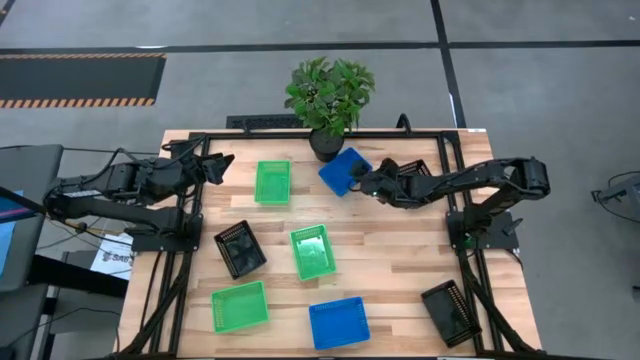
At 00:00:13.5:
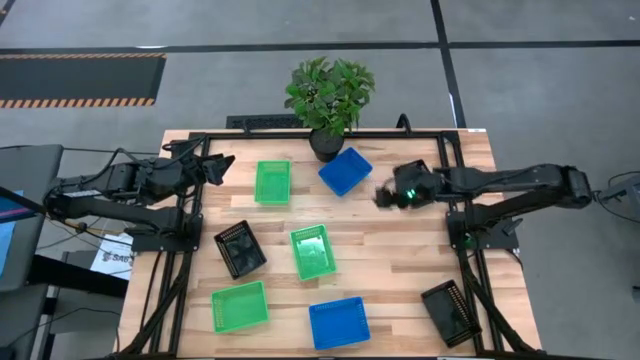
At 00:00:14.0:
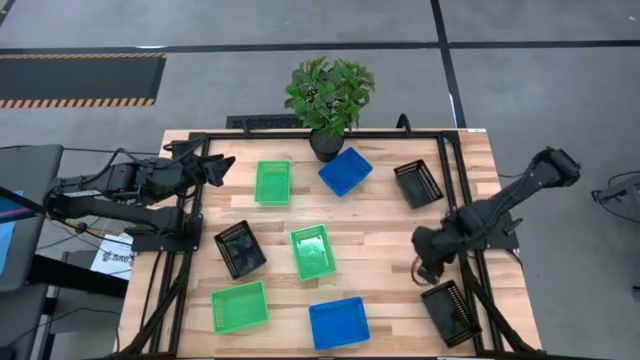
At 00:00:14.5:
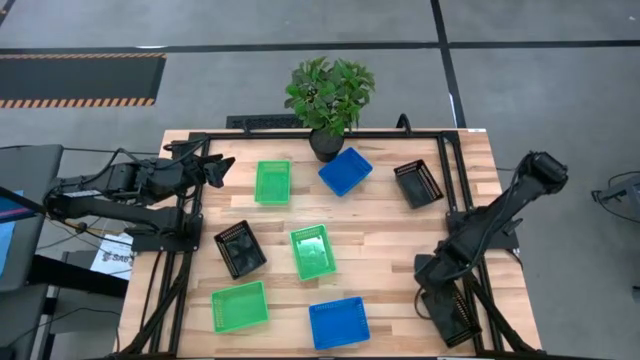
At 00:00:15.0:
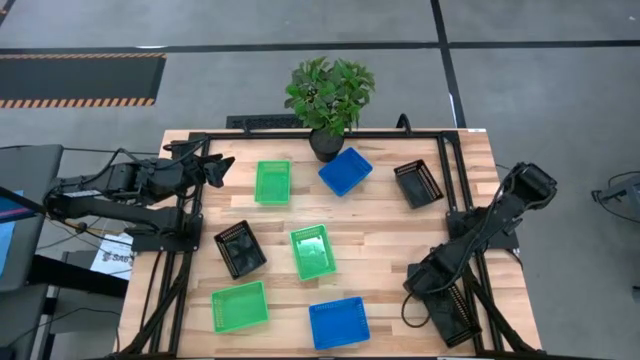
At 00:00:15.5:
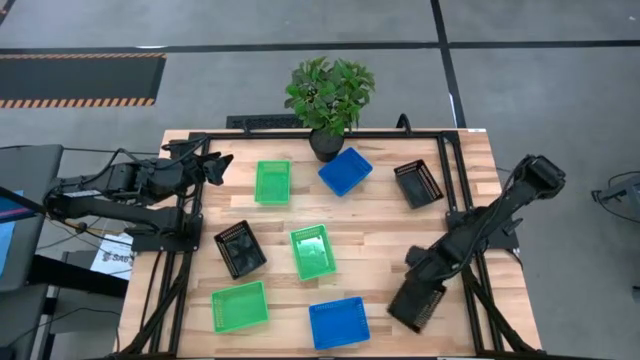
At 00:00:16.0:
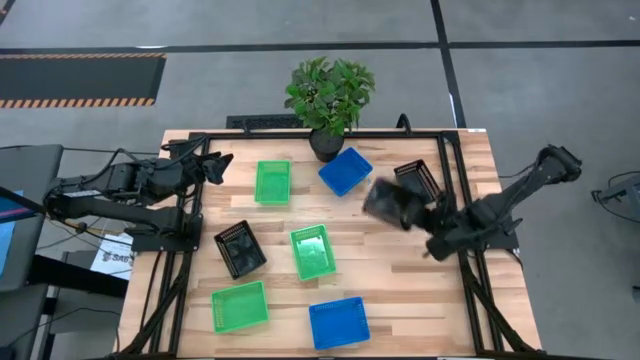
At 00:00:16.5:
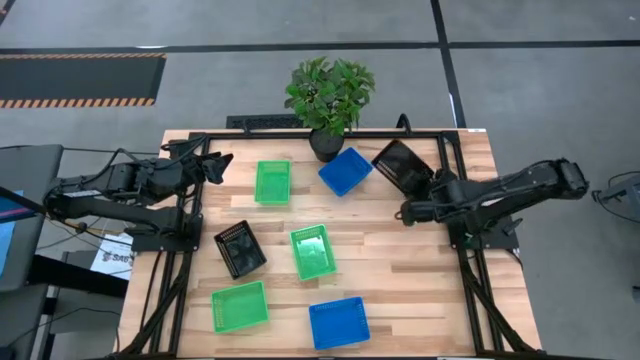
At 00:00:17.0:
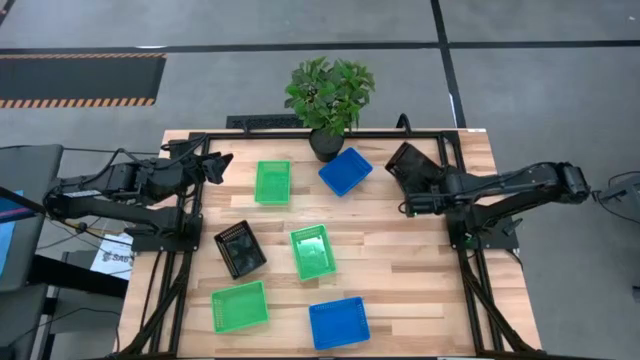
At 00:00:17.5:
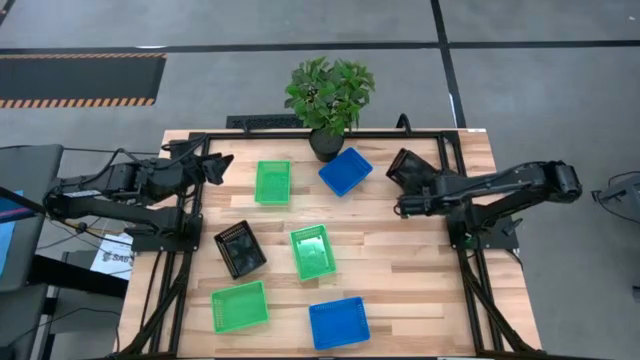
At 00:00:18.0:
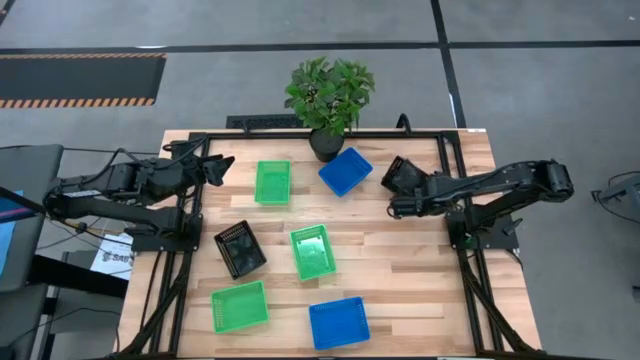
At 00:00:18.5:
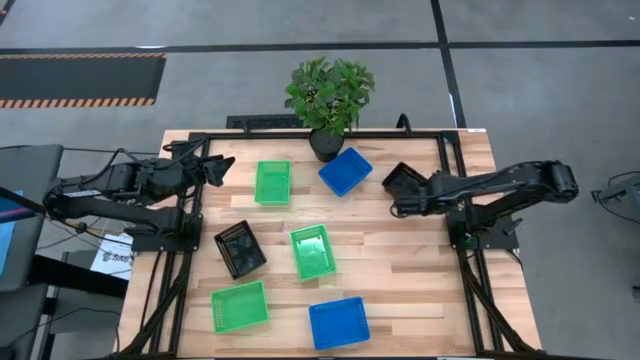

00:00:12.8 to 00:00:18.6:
Stack the bottom right black basket on the top right black basket

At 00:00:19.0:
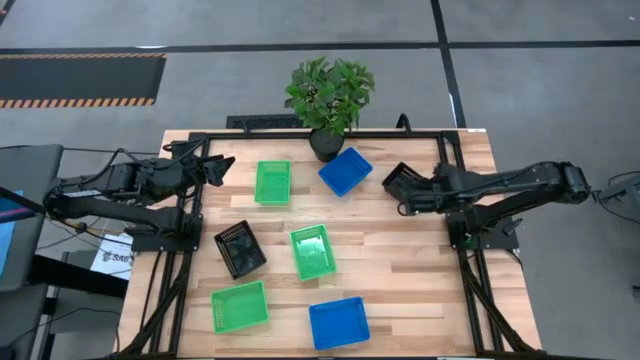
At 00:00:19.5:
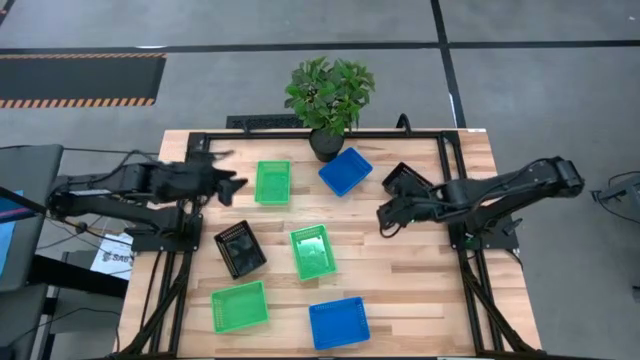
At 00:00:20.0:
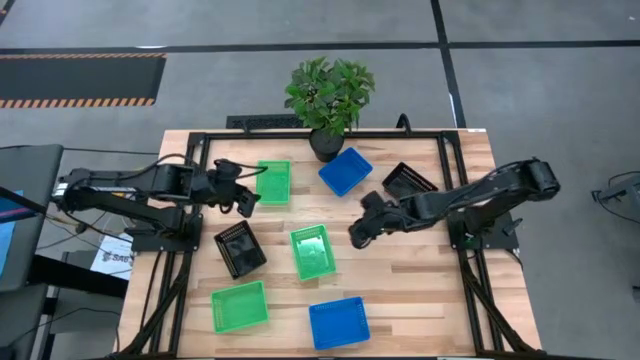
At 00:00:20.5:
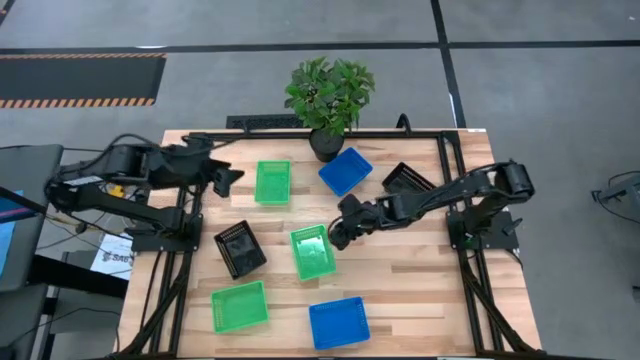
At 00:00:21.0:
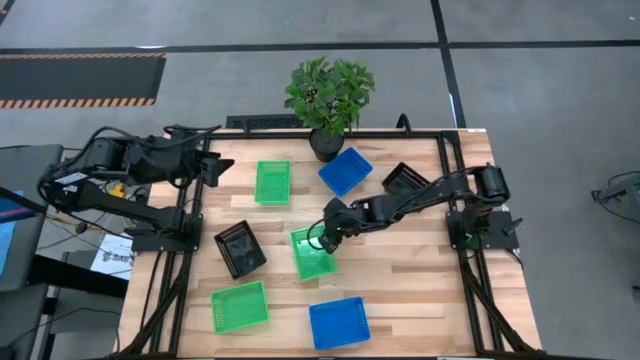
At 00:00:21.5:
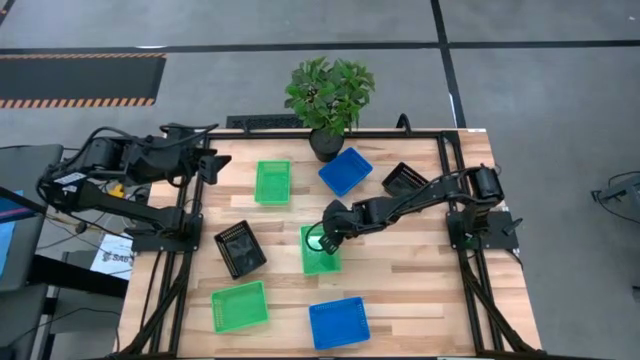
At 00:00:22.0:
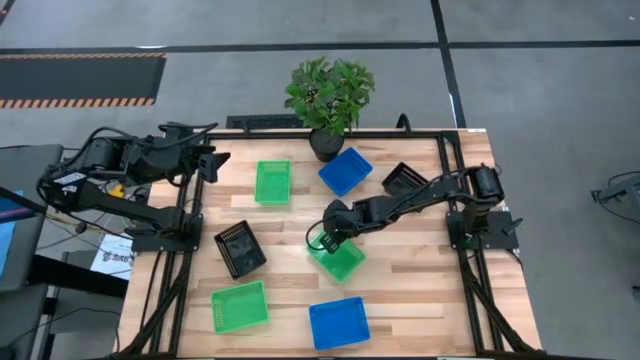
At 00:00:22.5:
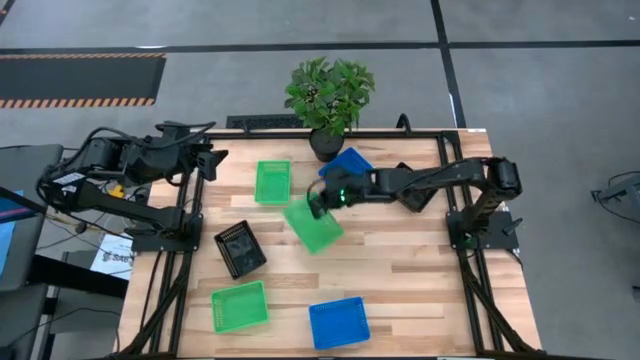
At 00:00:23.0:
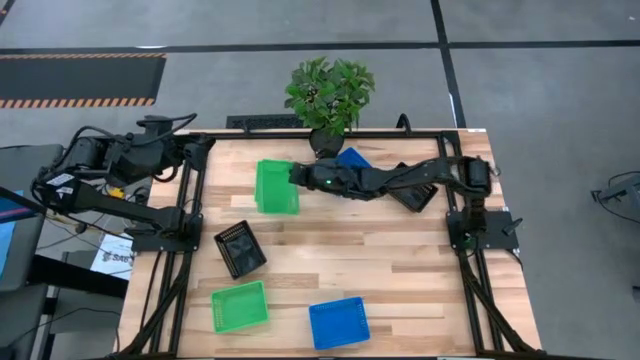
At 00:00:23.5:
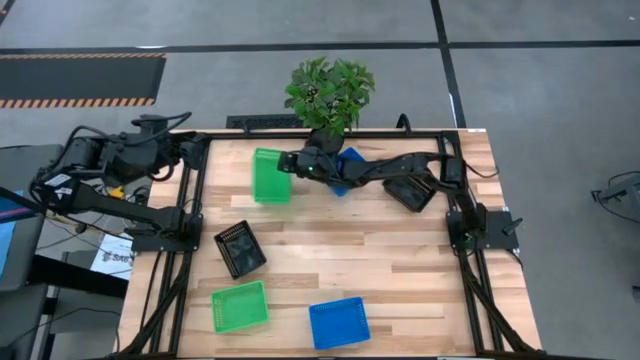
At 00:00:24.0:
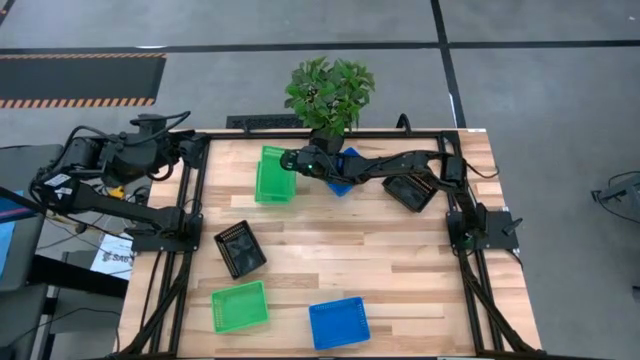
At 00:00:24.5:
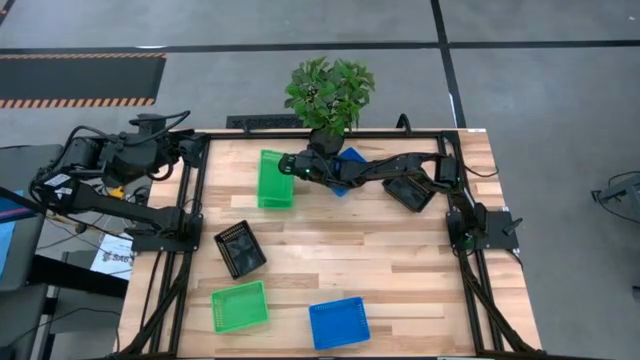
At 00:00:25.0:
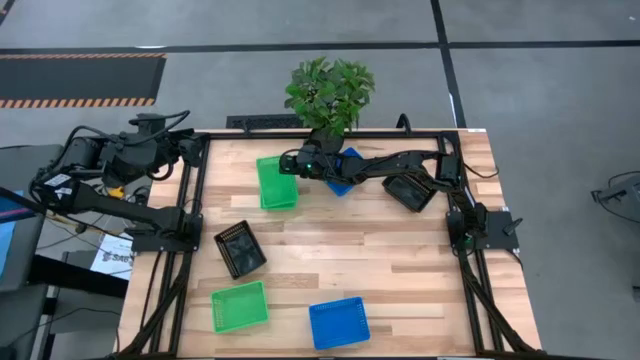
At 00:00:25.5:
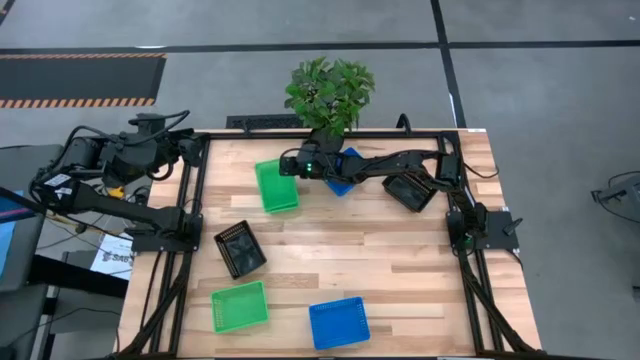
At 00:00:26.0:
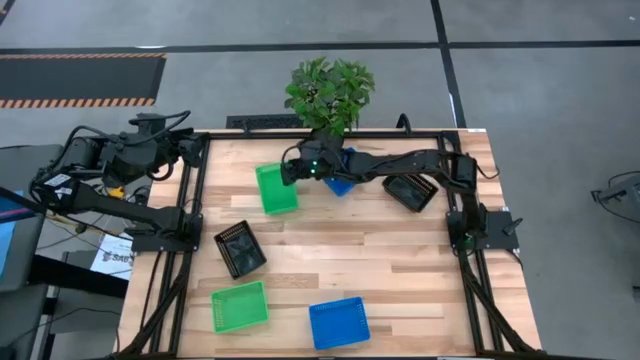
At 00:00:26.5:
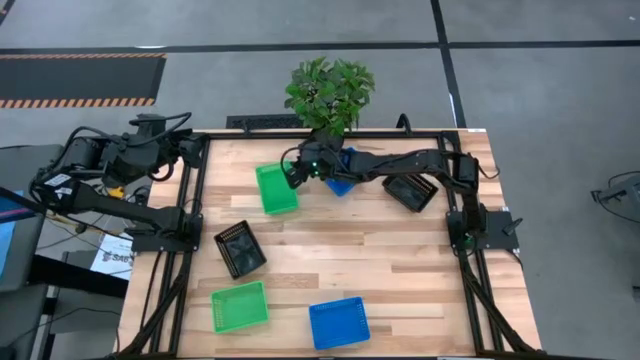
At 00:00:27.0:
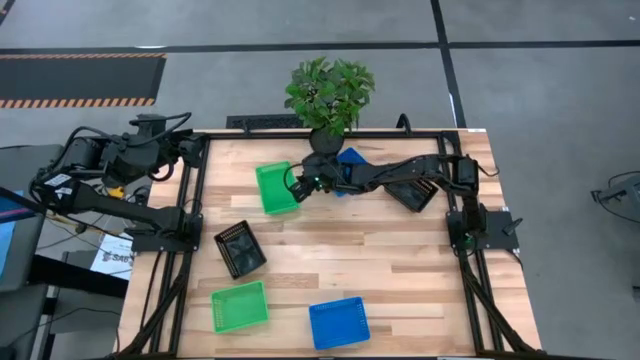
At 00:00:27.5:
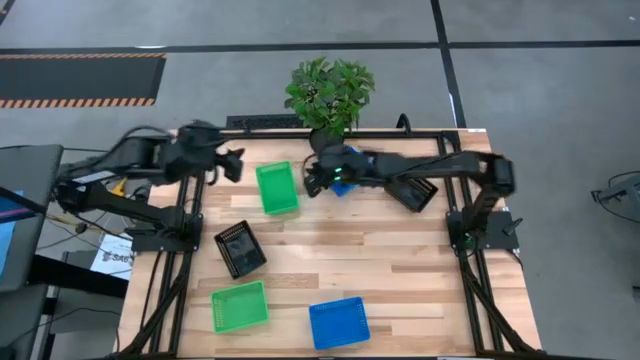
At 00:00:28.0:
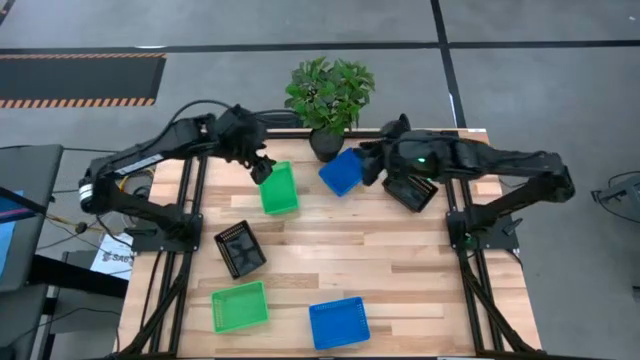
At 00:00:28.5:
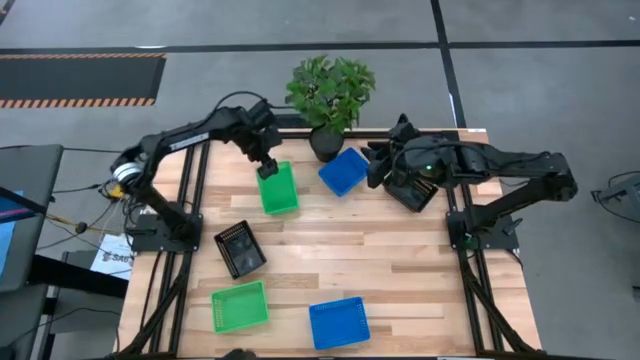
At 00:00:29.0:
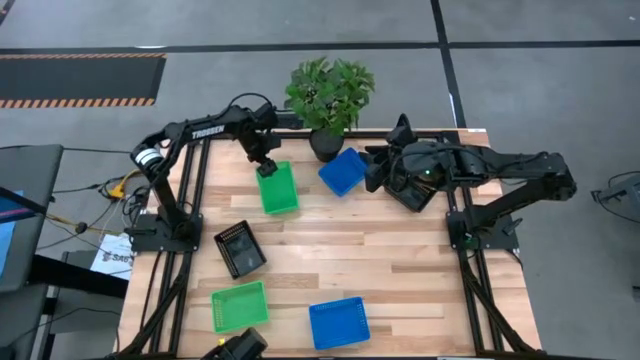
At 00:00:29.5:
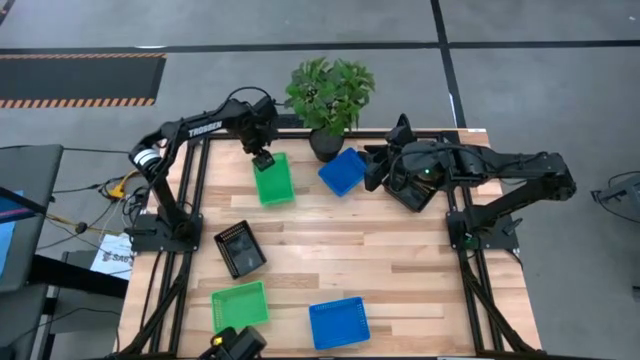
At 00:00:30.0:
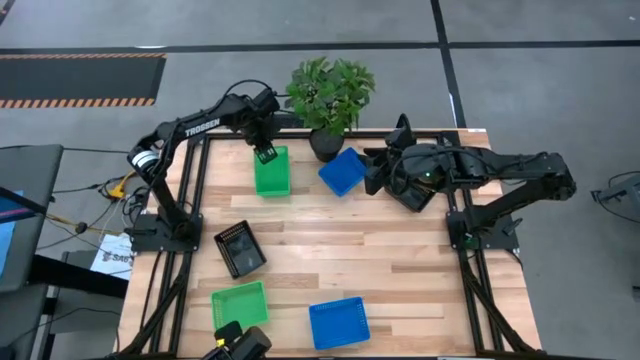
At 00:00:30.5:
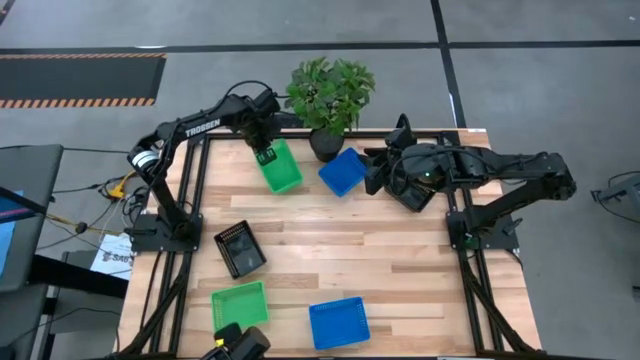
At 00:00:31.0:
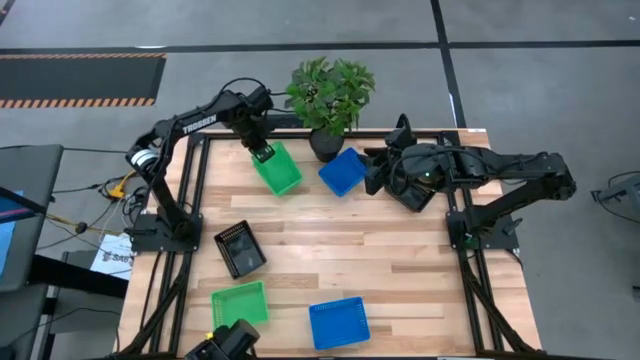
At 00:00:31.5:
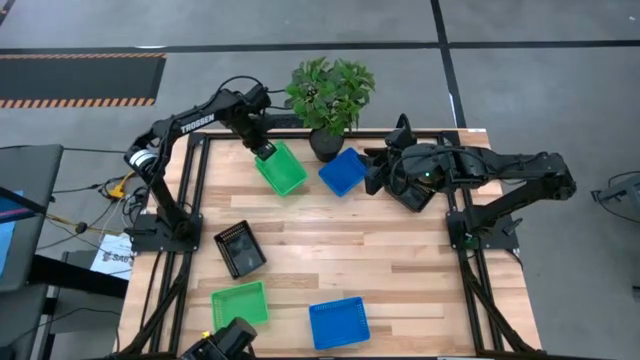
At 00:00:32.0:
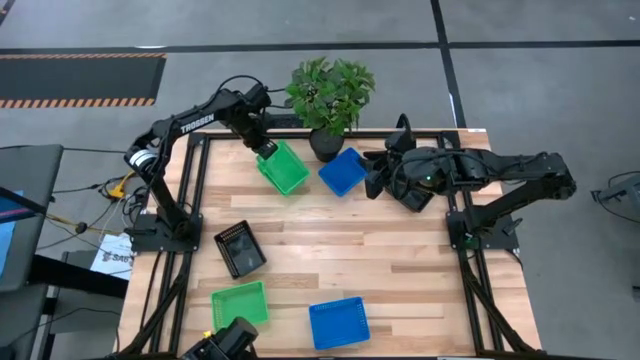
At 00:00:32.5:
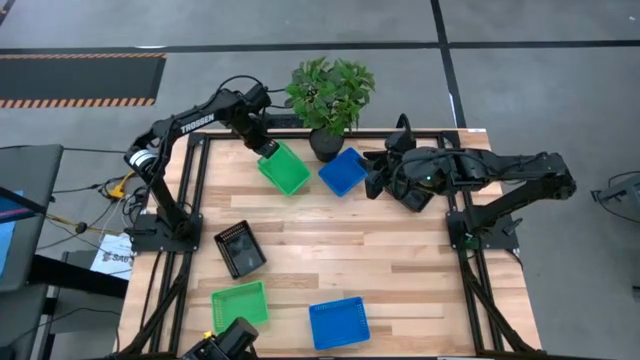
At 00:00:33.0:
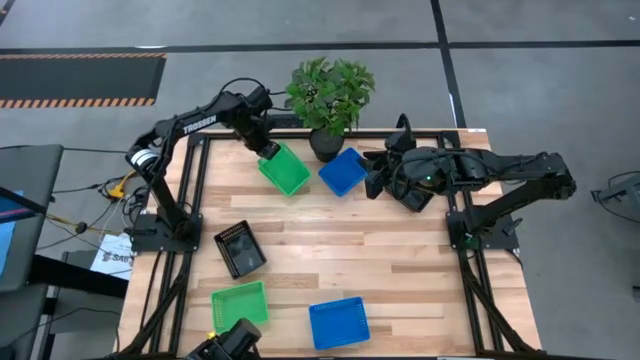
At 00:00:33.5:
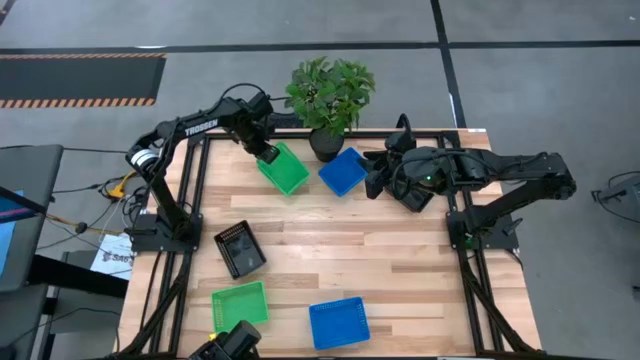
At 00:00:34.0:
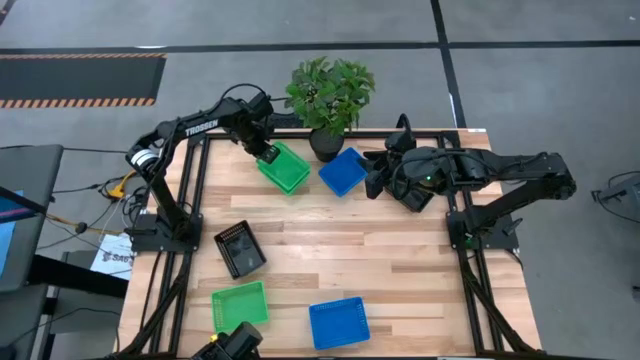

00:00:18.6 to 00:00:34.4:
Stack the right green basket on the top left green basket
